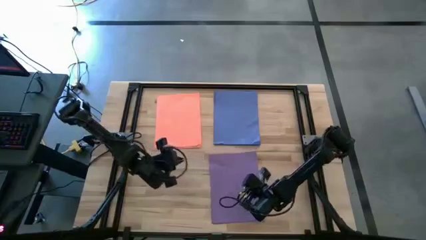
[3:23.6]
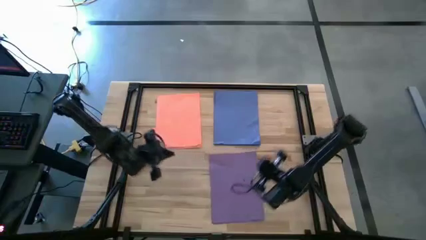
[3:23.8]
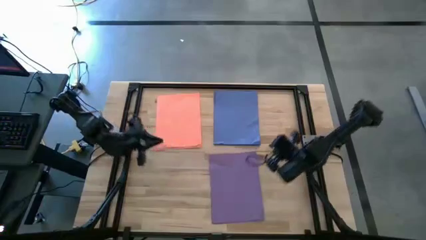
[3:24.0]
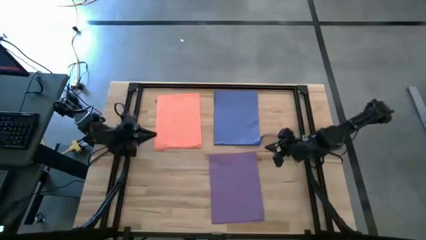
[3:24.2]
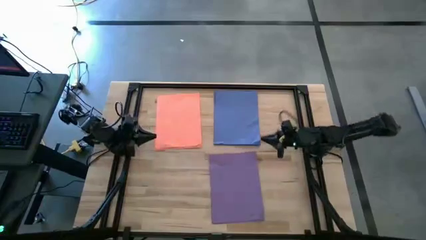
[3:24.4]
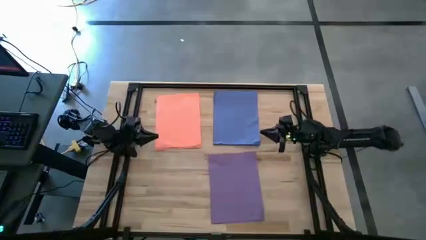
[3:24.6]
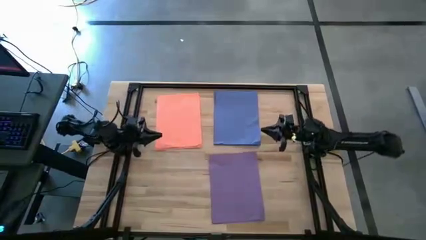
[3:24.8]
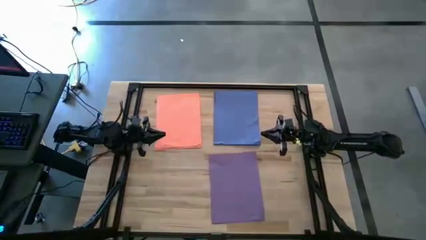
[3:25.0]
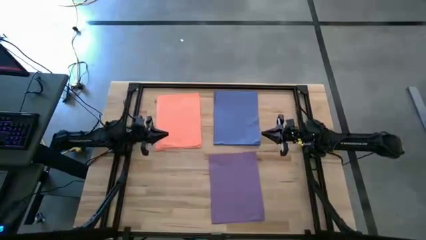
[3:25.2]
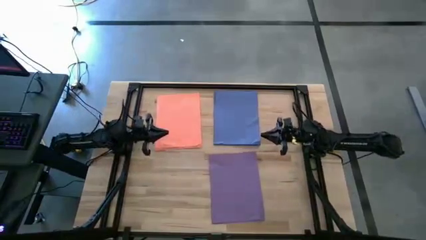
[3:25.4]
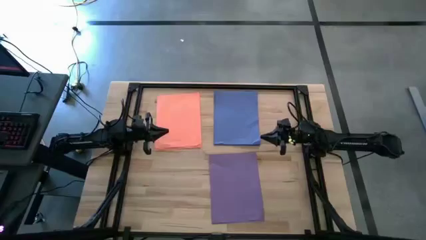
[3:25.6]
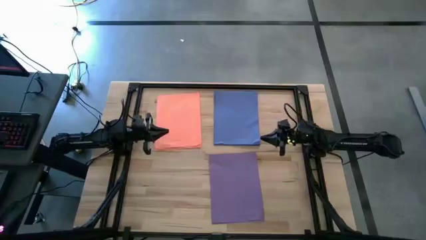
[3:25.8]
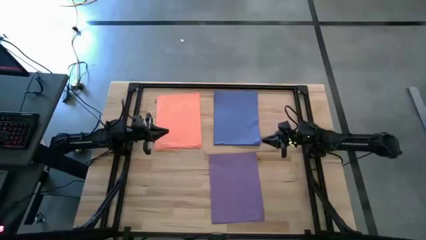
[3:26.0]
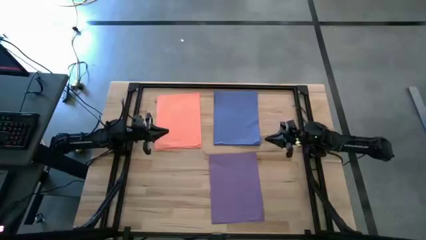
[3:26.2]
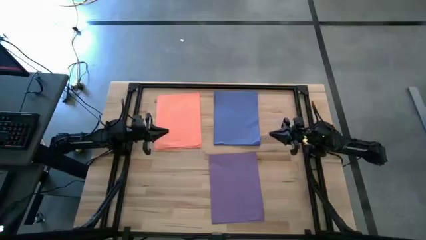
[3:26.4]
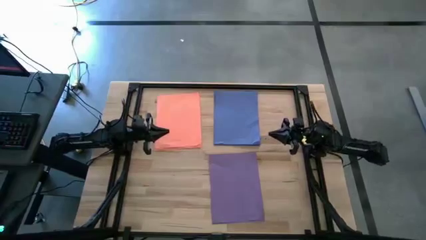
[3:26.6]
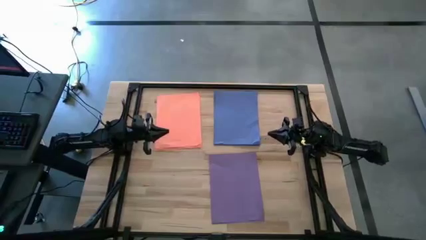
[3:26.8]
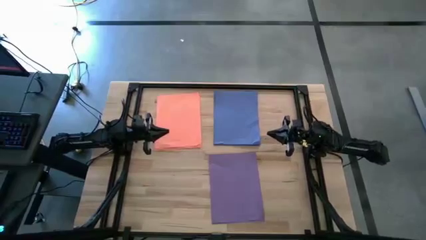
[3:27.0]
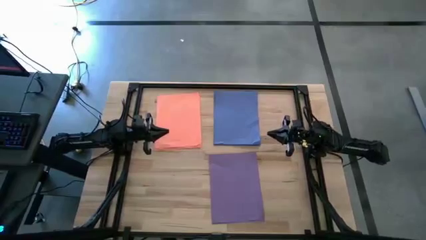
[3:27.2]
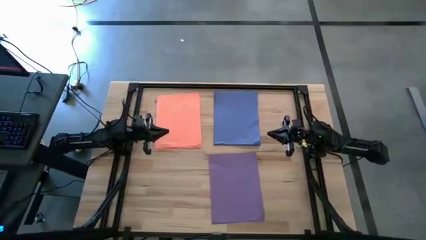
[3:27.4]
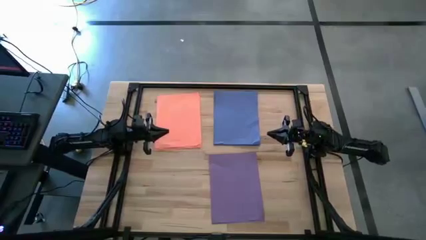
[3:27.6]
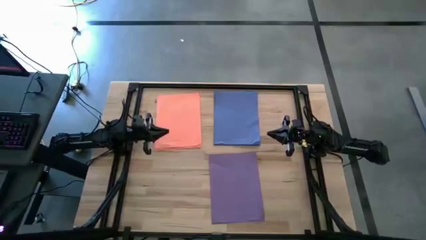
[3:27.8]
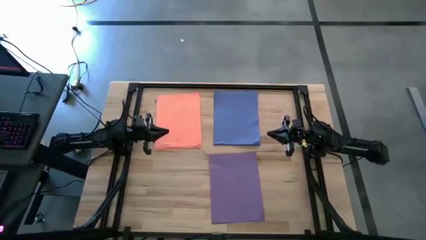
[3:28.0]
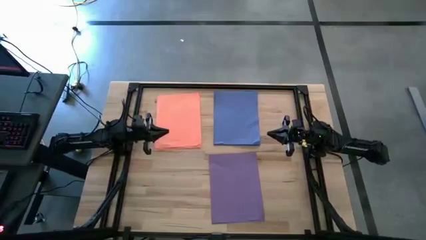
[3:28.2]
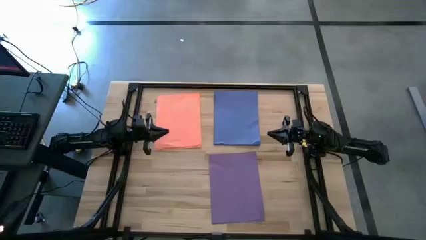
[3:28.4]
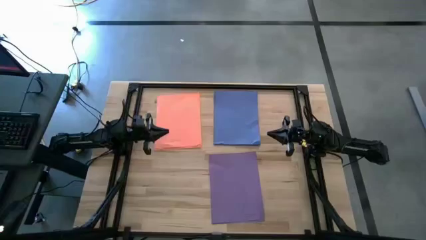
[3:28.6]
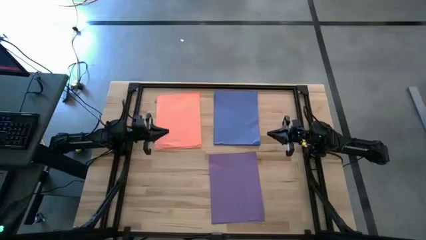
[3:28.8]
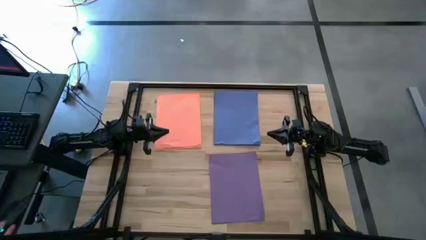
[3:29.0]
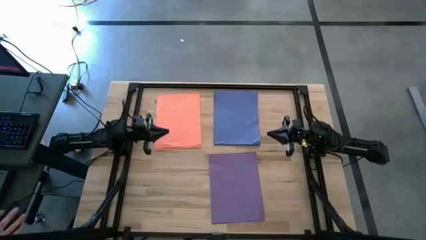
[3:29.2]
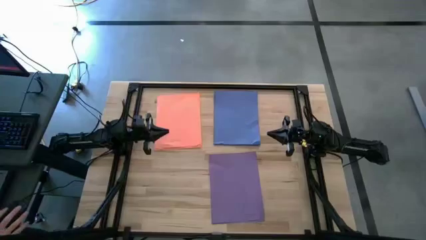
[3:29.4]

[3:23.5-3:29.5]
Task: Organize paper
Return to Home Position

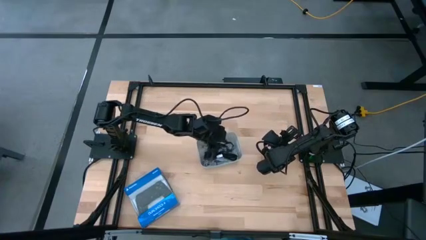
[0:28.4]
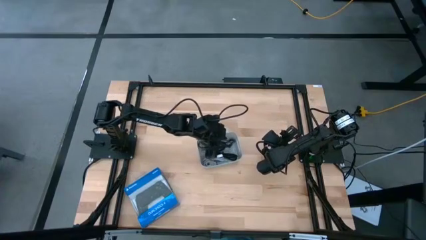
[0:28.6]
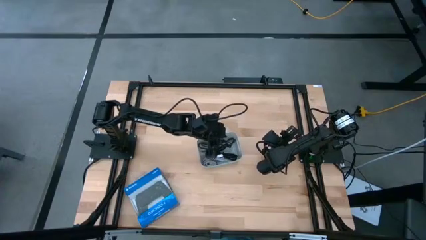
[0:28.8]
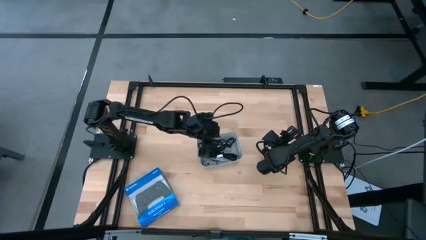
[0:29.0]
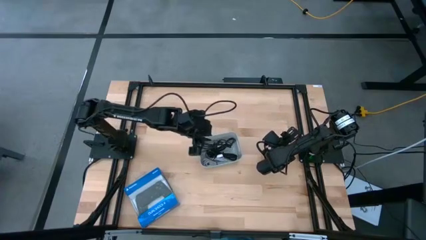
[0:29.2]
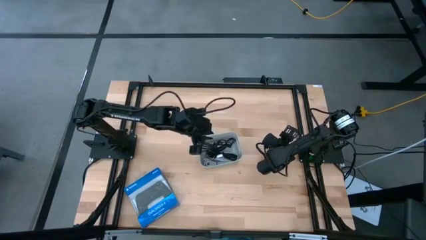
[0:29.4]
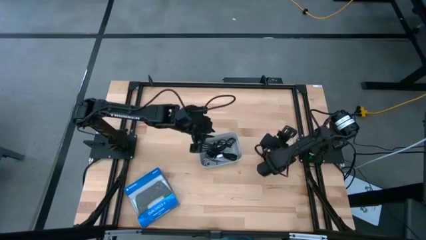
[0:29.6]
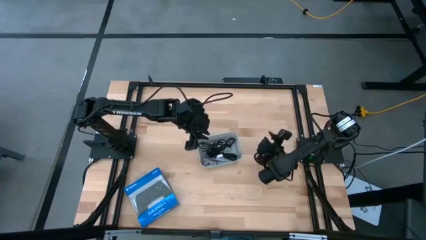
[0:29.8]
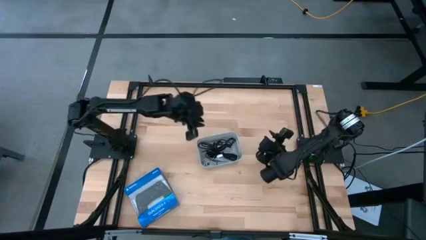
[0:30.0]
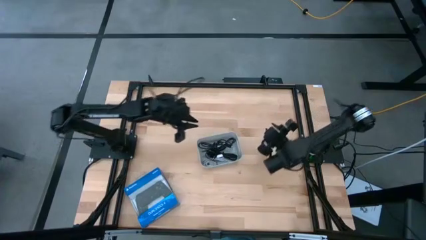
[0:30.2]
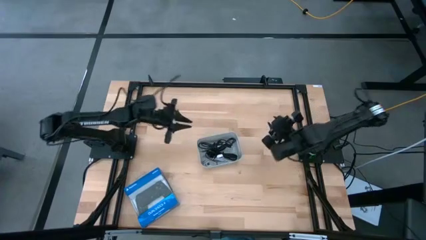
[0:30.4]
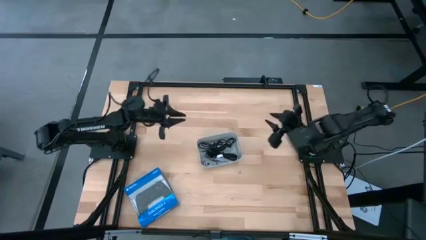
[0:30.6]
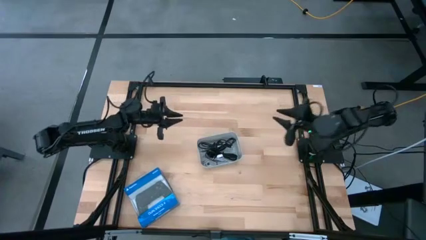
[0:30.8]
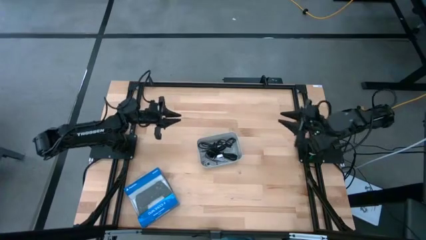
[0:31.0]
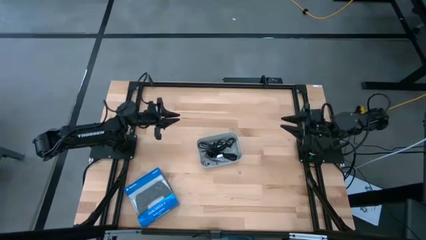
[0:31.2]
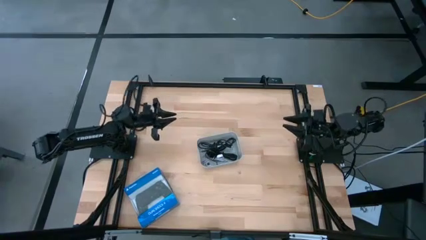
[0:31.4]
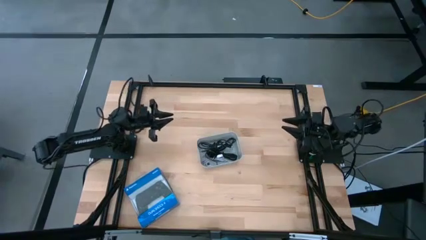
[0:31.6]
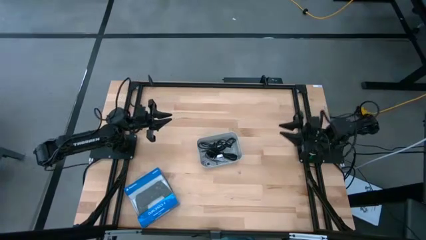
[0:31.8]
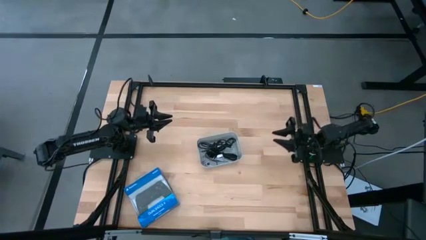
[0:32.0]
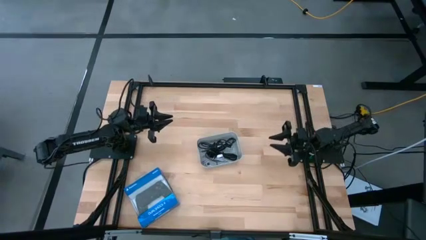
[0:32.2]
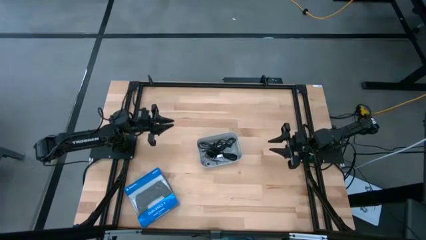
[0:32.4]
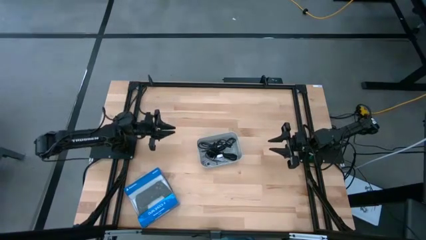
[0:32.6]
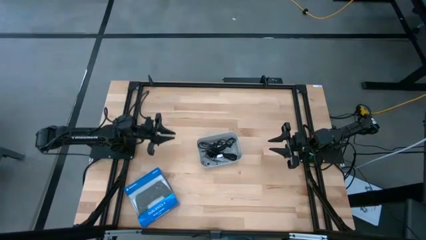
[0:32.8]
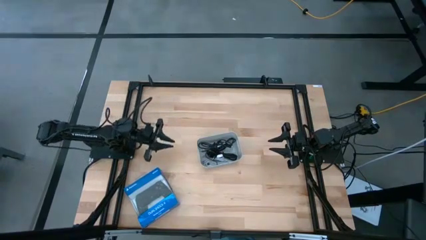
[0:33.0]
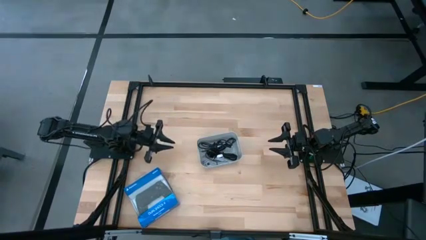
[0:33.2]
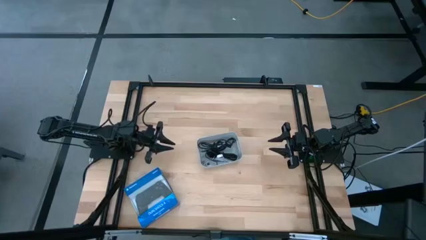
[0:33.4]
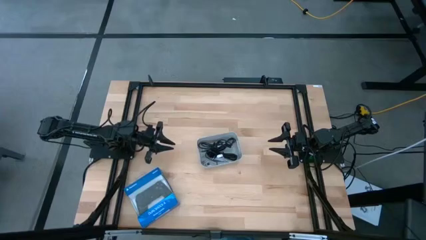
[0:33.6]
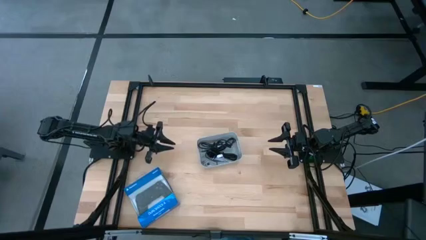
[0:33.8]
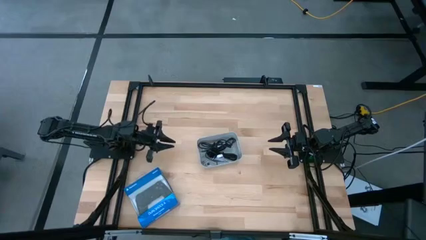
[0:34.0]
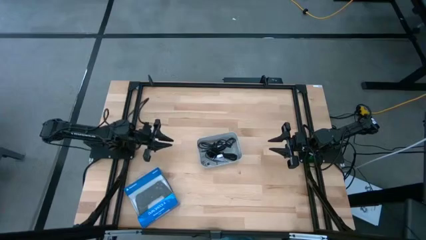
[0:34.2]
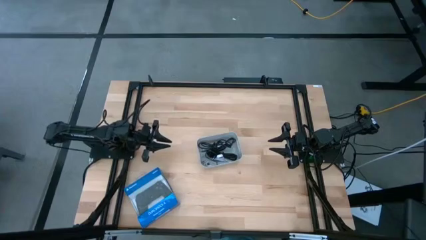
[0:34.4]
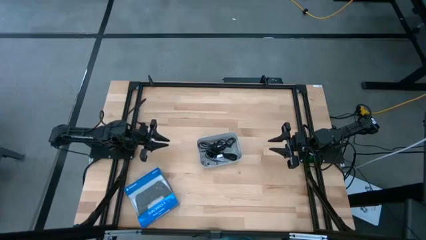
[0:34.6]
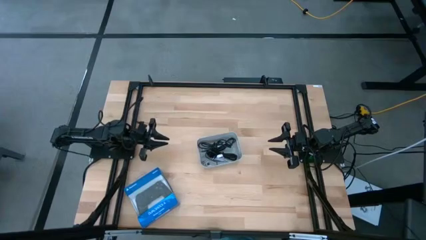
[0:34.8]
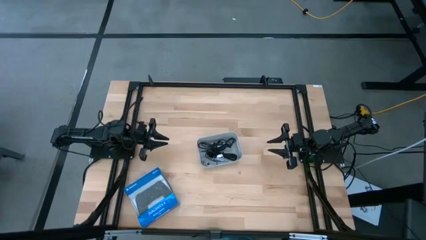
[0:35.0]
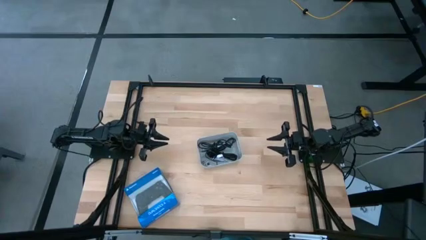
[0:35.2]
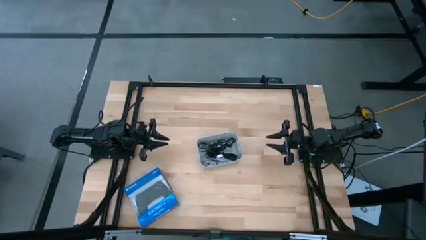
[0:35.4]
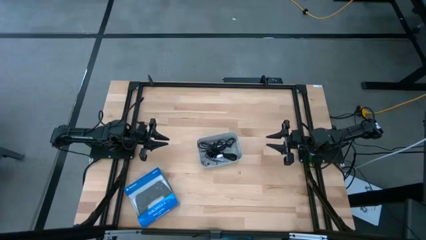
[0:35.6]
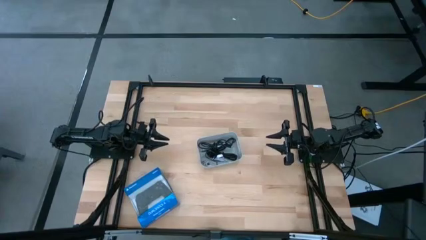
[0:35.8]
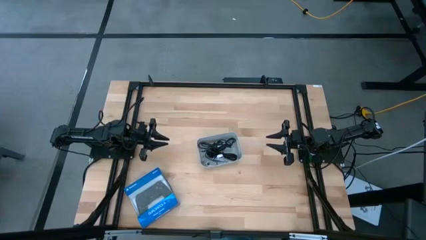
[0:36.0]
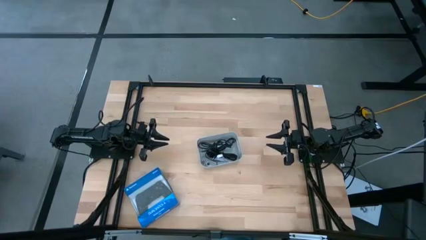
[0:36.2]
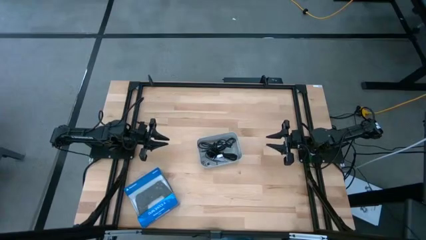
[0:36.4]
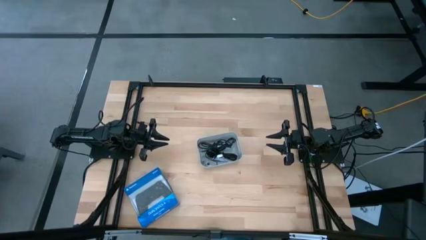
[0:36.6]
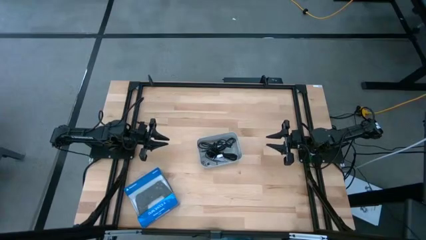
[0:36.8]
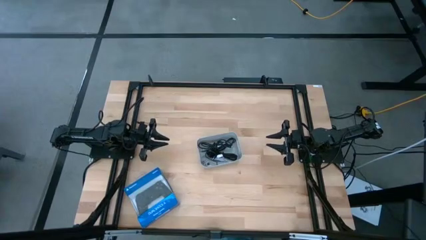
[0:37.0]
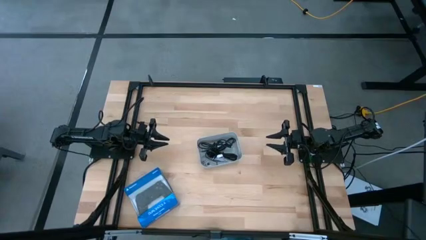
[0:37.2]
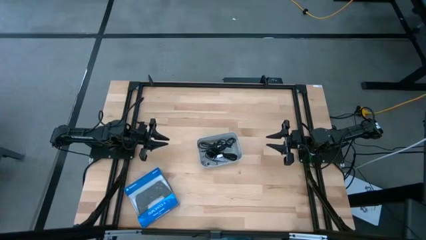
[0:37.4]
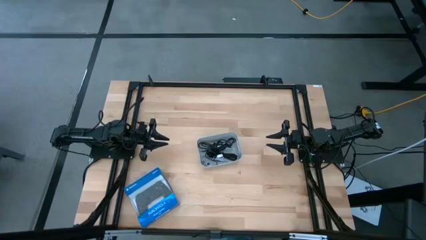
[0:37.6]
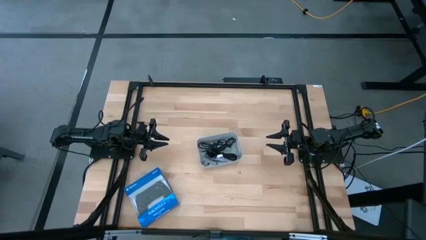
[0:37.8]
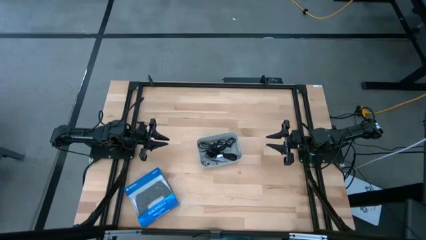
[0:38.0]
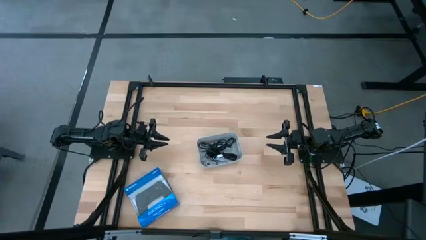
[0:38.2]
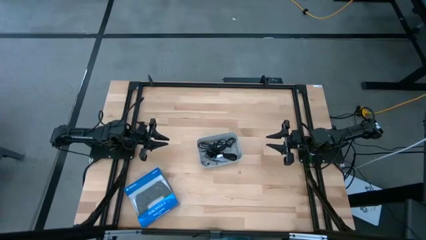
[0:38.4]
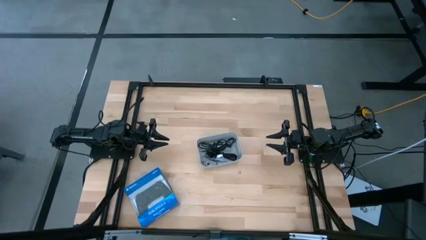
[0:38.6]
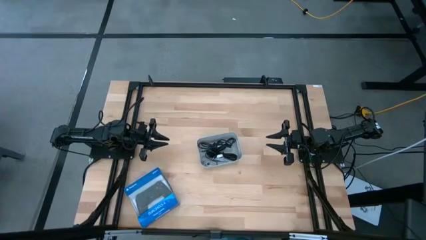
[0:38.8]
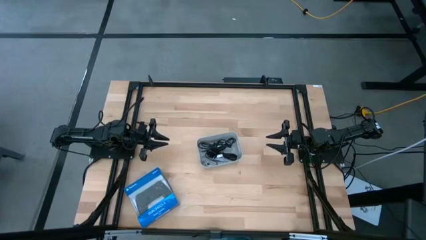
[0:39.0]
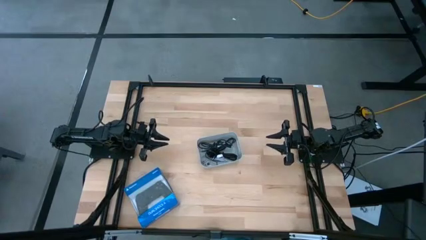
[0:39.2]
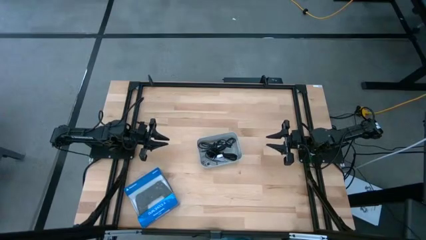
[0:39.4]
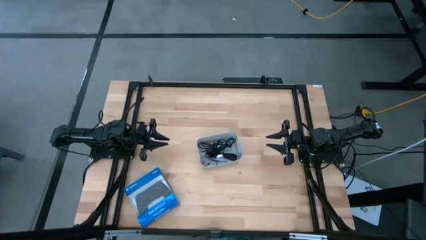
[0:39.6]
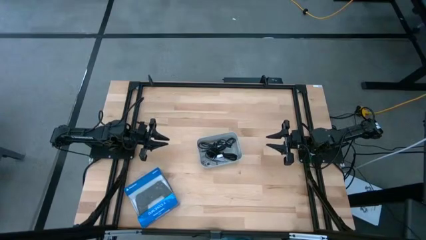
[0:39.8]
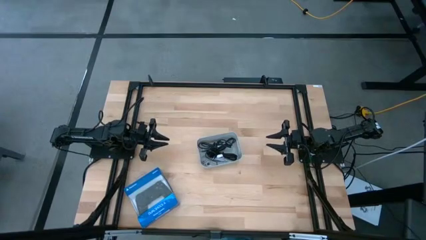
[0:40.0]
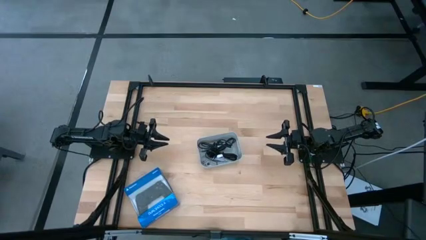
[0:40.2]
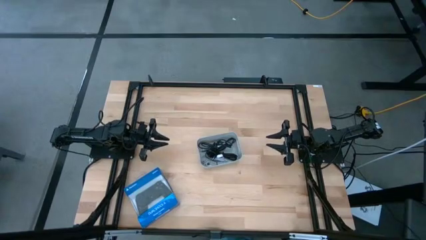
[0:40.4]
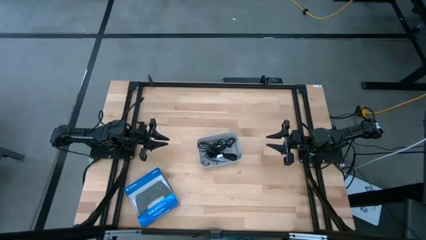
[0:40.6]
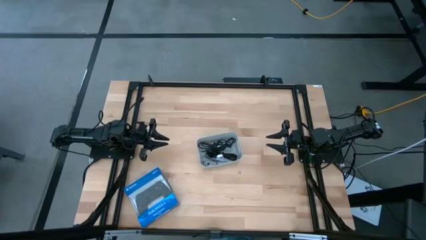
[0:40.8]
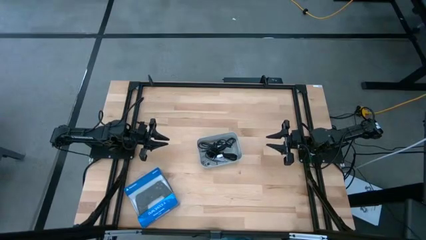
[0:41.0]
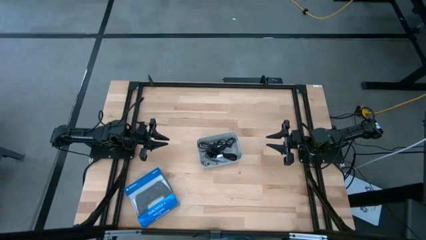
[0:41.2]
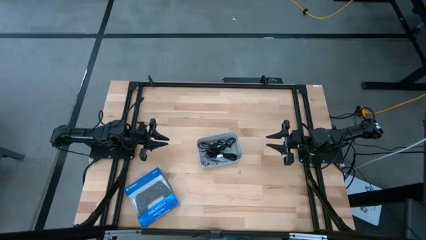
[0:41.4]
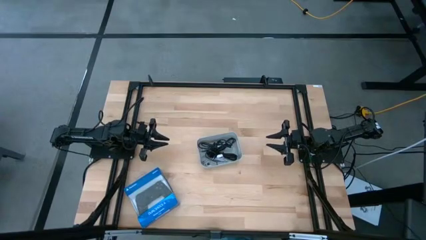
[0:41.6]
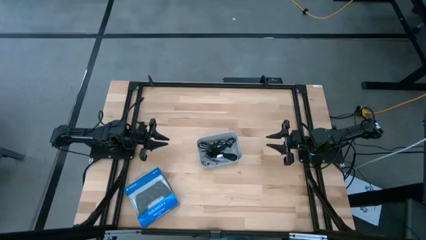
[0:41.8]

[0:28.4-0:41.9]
Task: Pick and place USB-C Cables
Return to Home Position
